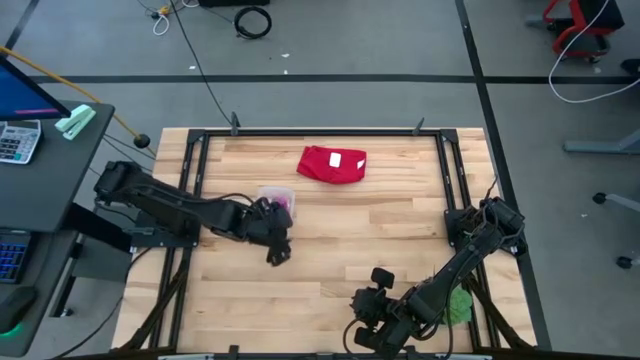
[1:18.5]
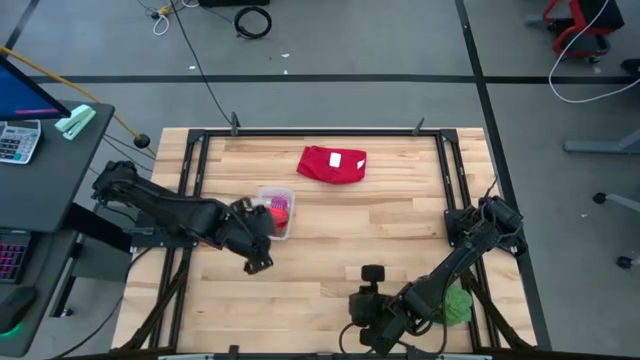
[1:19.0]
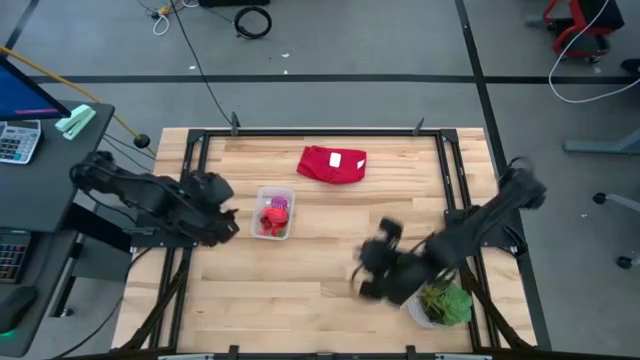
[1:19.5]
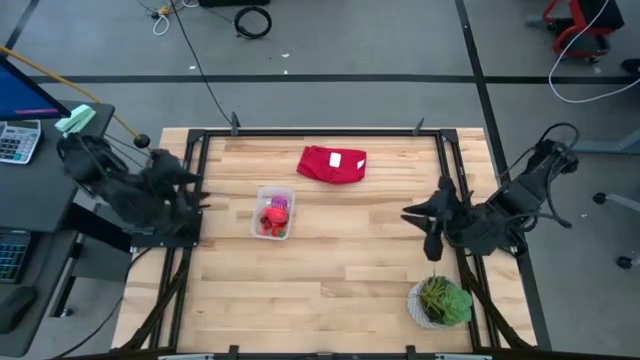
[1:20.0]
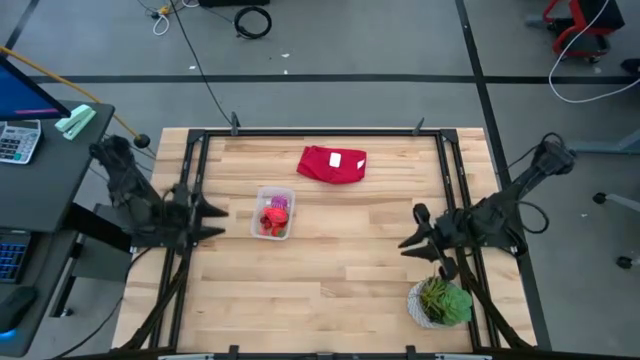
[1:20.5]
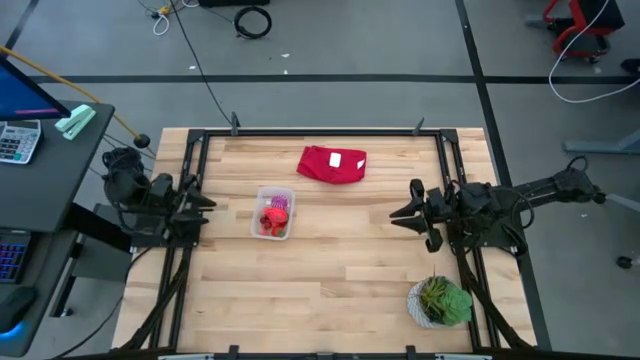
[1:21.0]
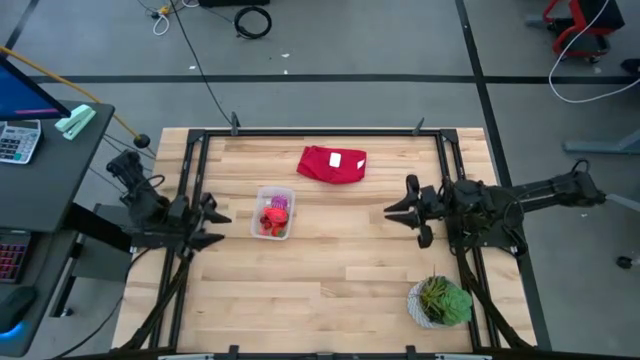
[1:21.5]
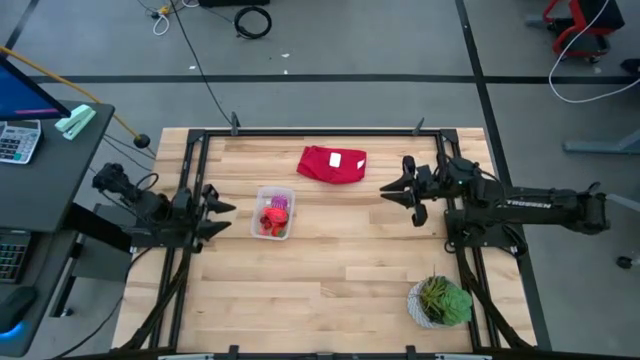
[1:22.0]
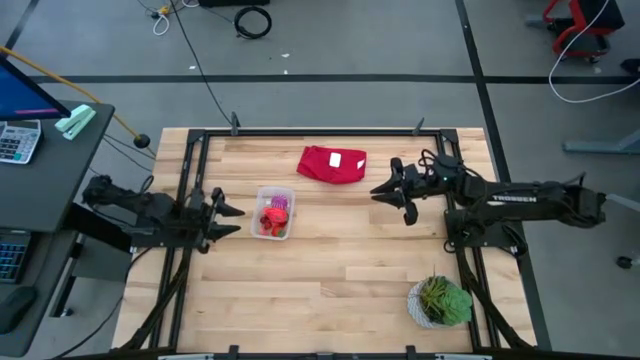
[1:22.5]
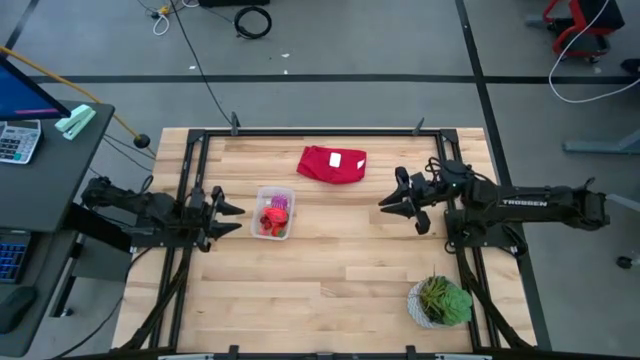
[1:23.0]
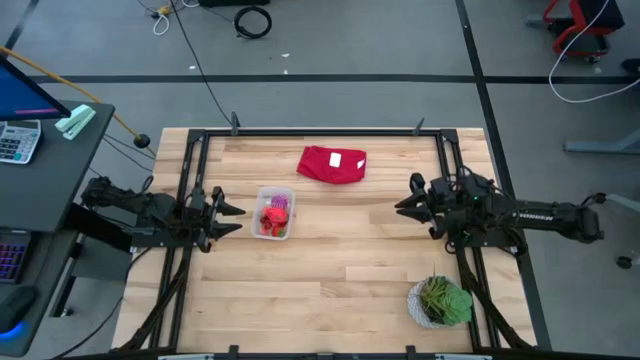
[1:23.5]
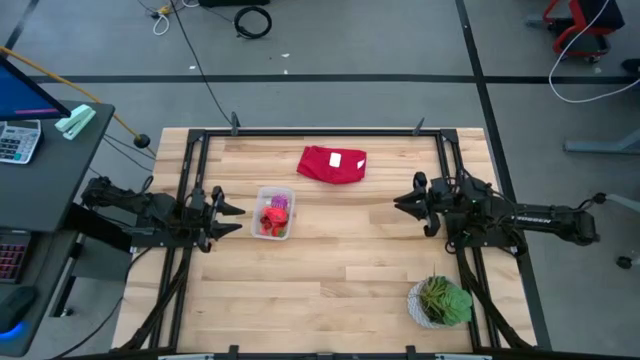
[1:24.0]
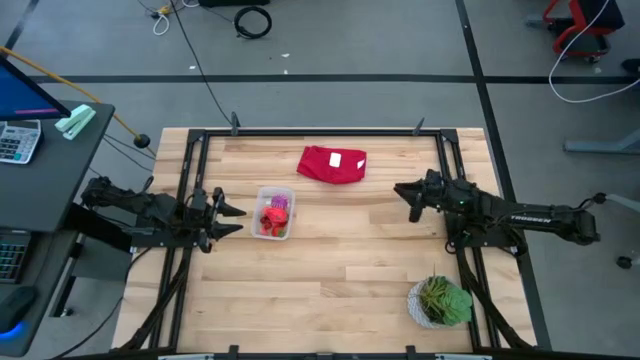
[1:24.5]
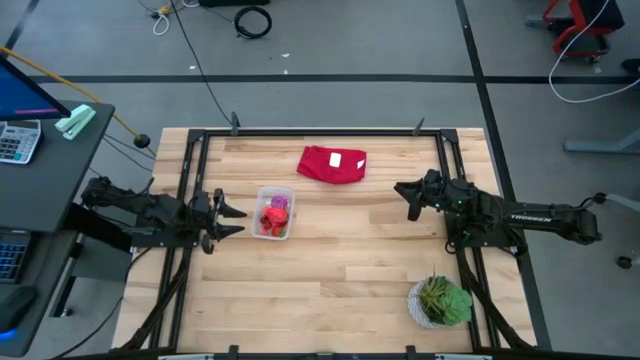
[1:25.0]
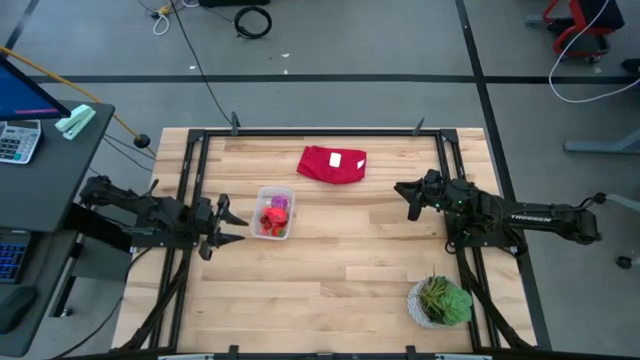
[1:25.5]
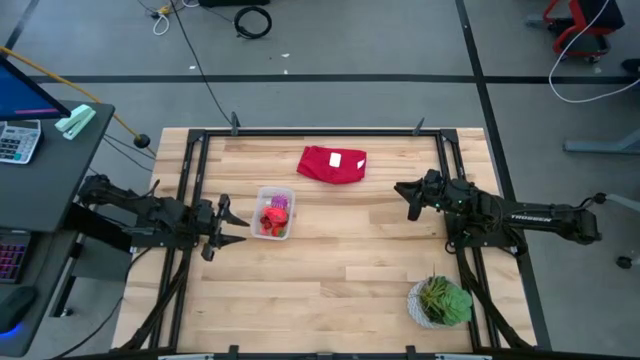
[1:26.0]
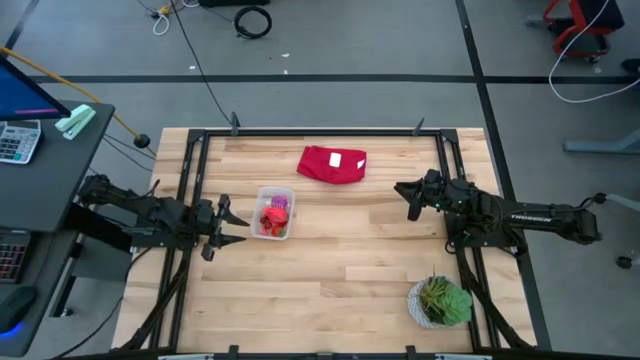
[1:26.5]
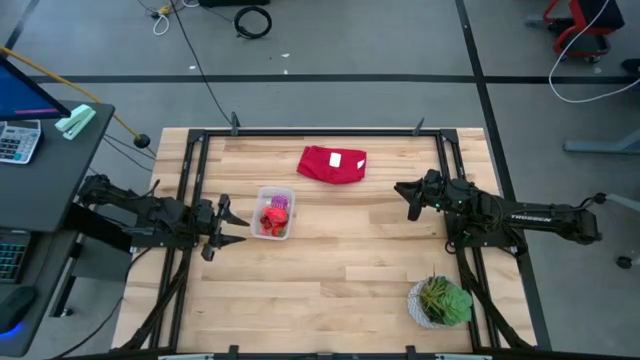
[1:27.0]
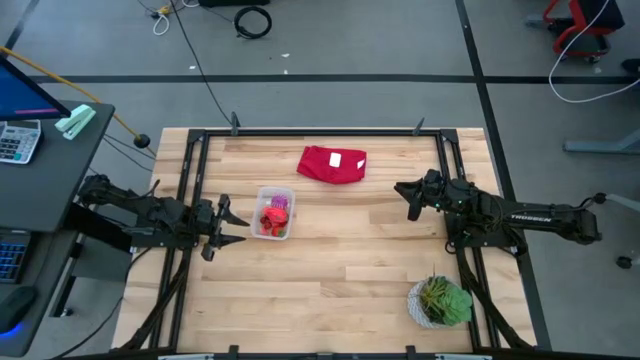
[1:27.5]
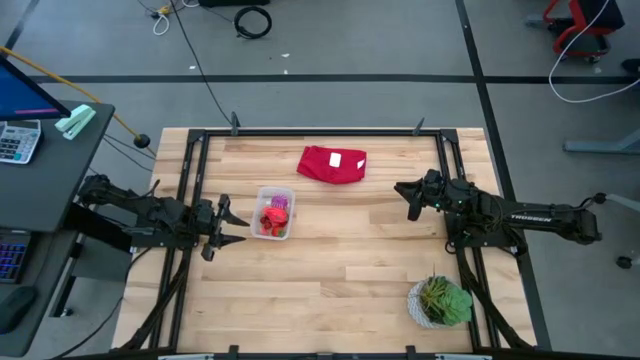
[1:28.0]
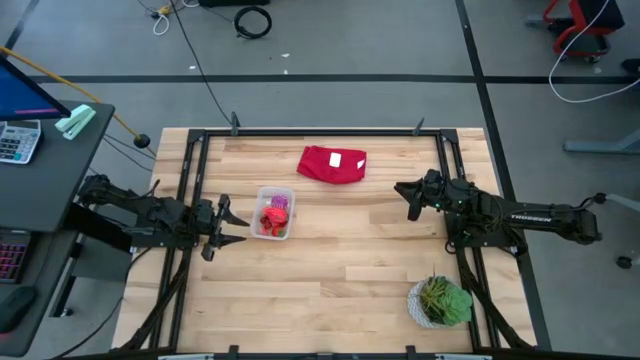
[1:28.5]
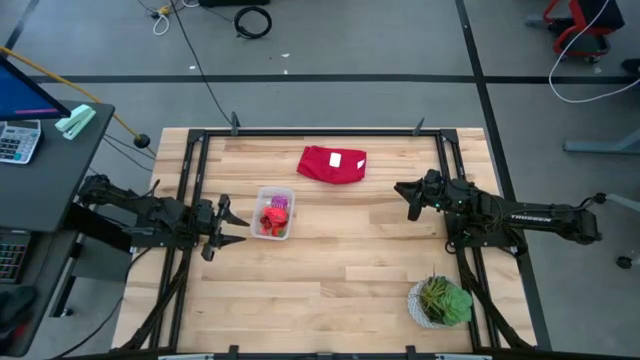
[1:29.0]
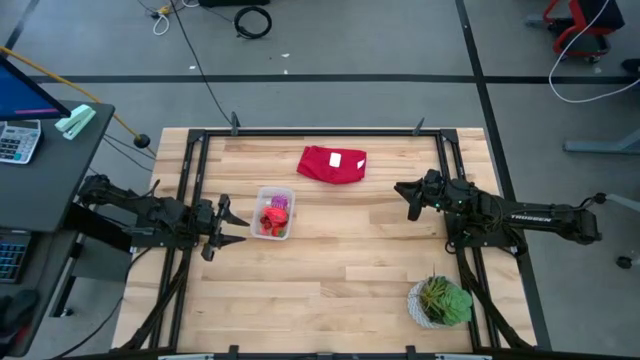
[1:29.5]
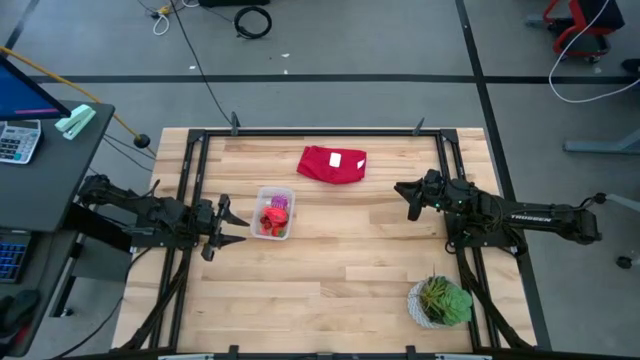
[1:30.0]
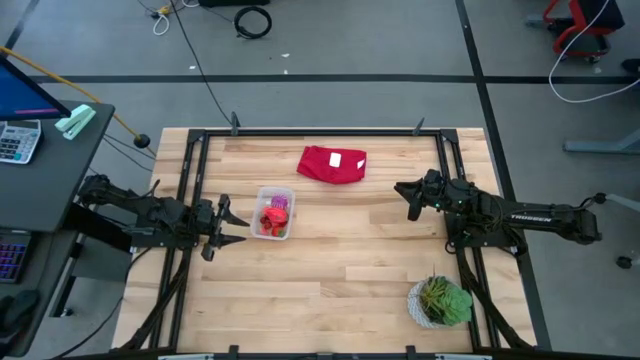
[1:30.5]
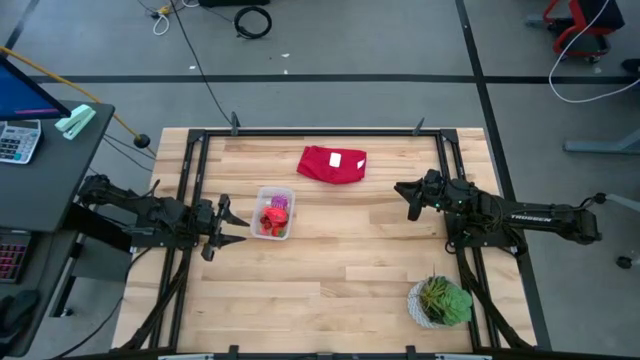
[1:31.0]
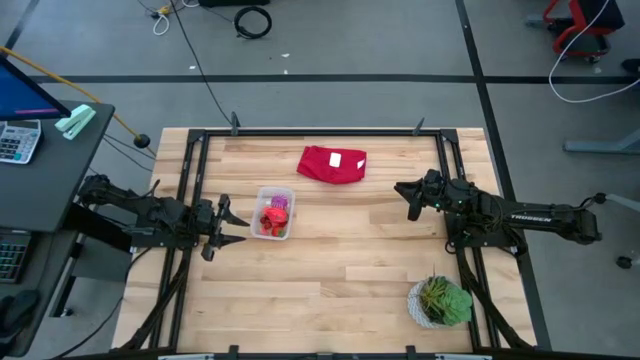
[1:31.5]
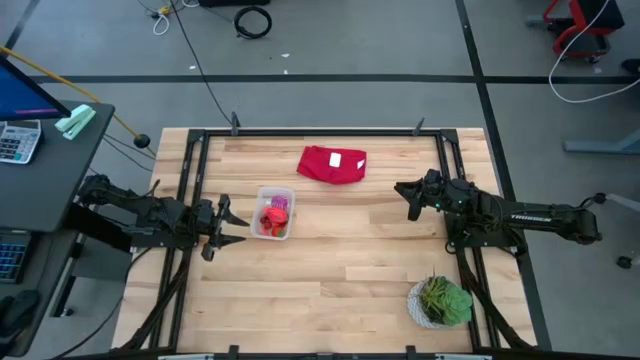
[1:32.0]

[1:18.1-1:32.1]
Task: Pick and placing Produce into tupperware
Return to Home Position

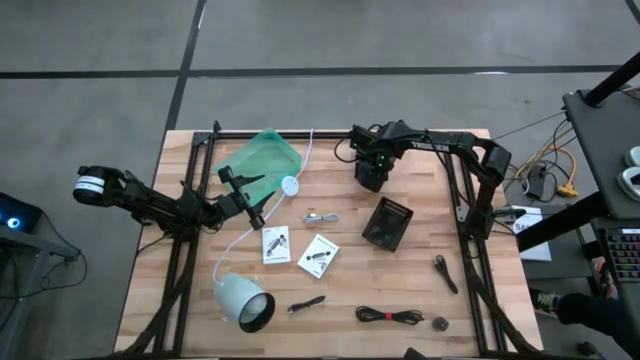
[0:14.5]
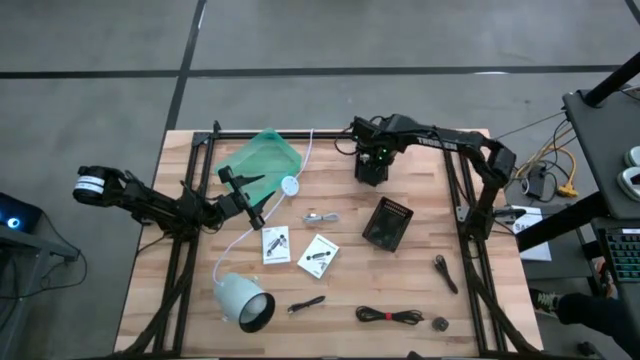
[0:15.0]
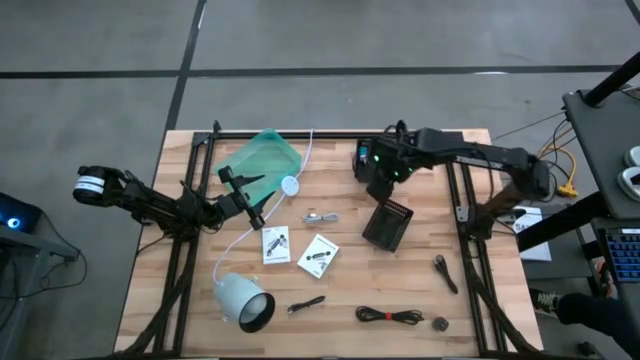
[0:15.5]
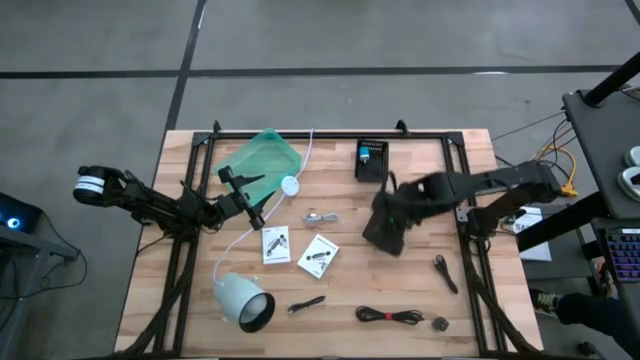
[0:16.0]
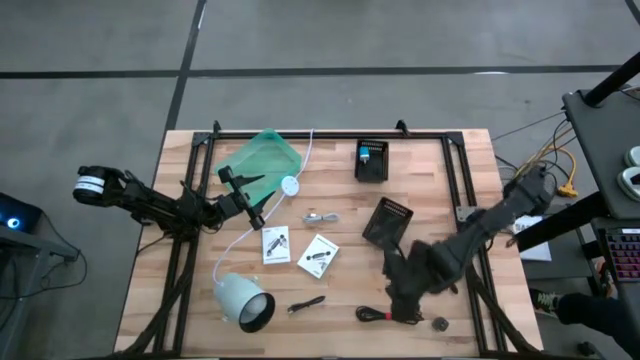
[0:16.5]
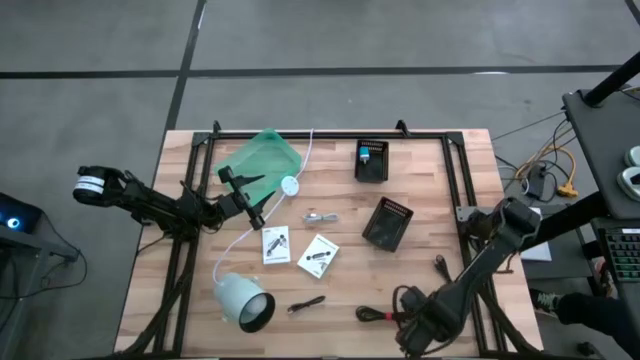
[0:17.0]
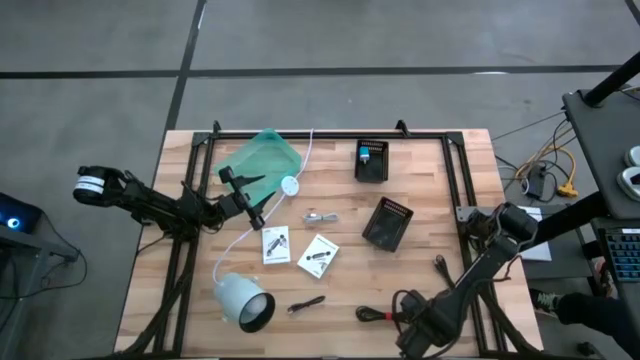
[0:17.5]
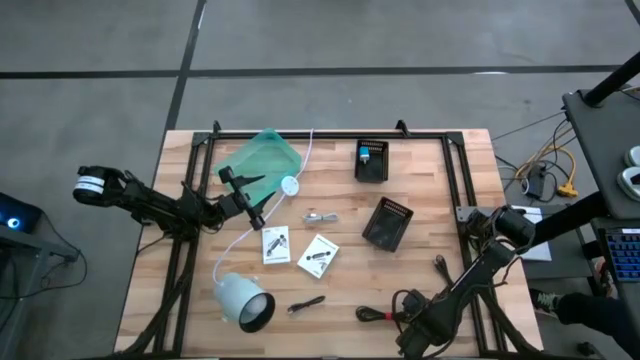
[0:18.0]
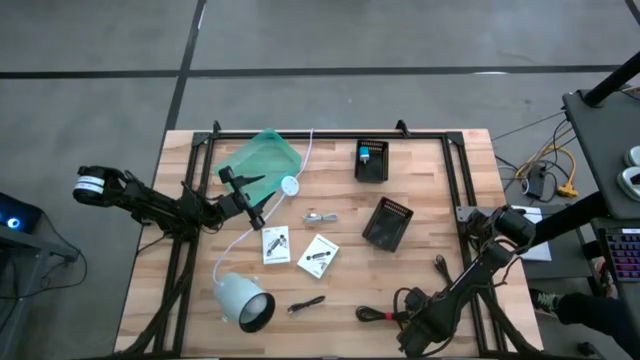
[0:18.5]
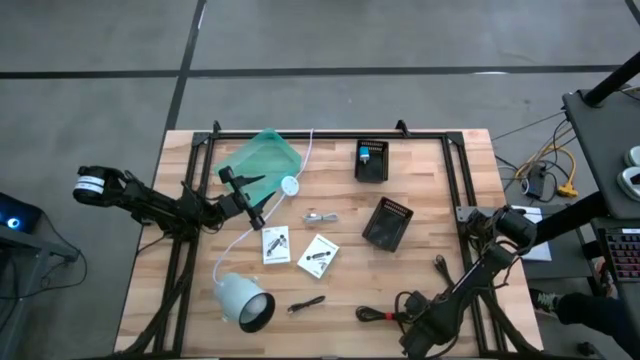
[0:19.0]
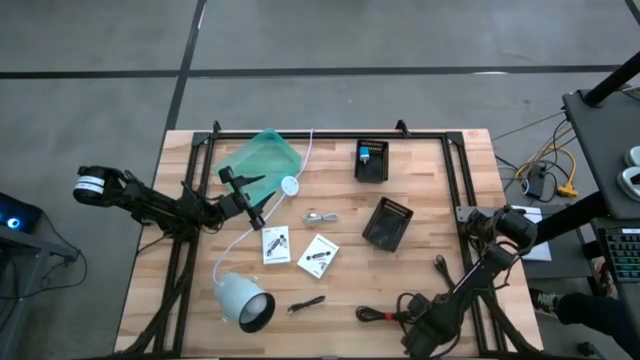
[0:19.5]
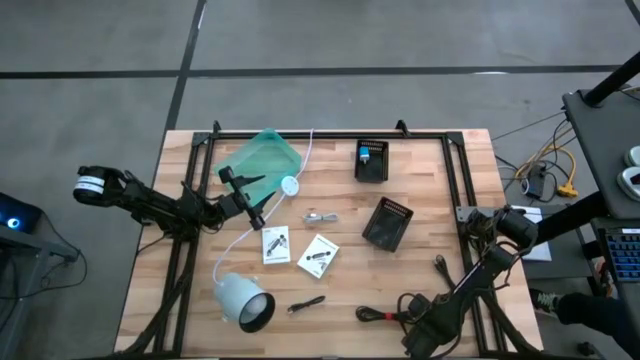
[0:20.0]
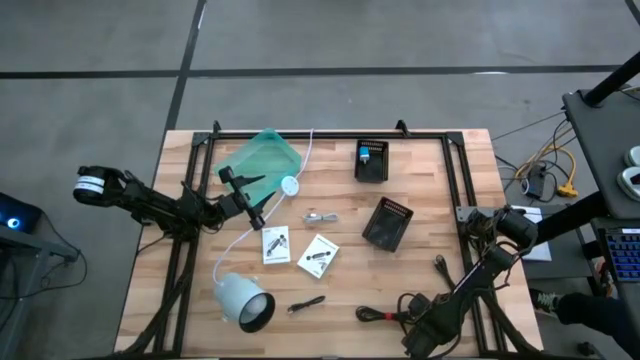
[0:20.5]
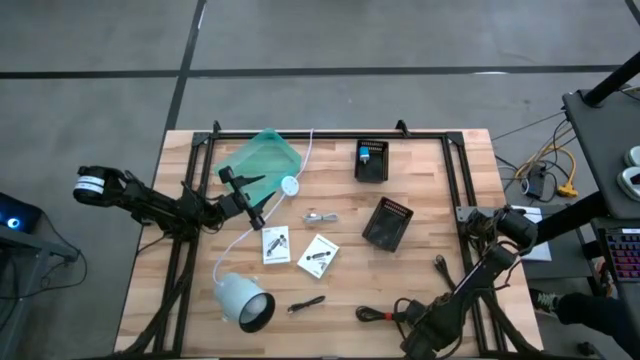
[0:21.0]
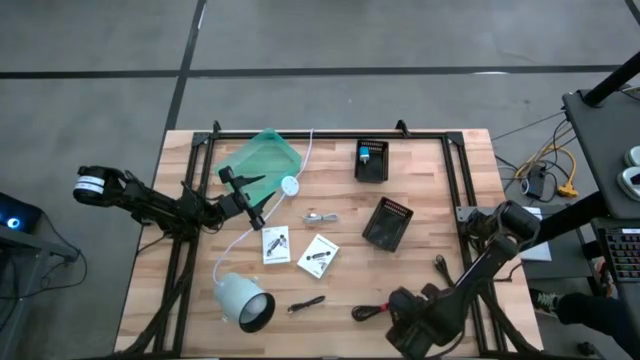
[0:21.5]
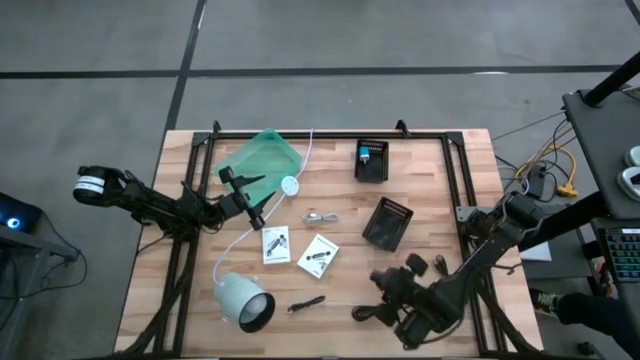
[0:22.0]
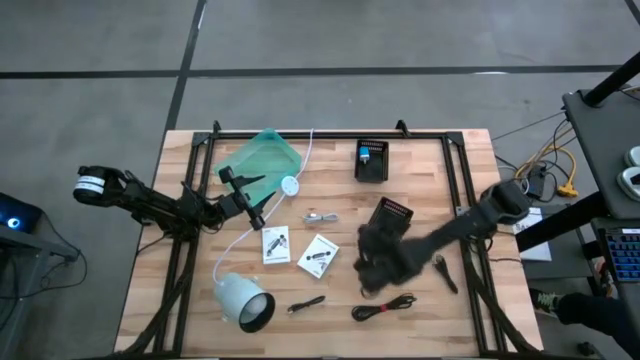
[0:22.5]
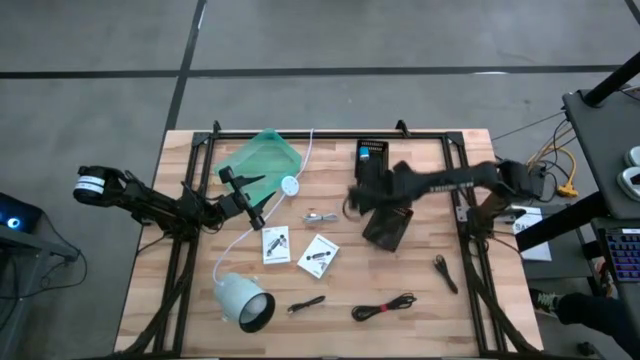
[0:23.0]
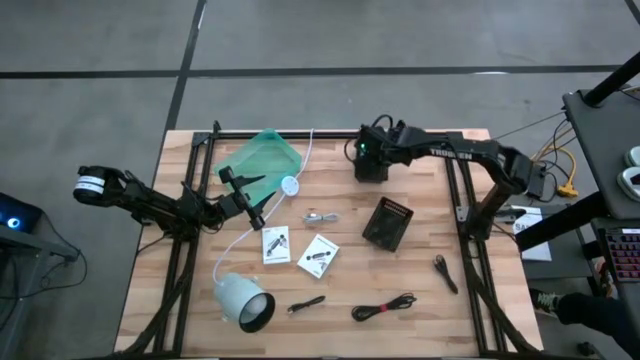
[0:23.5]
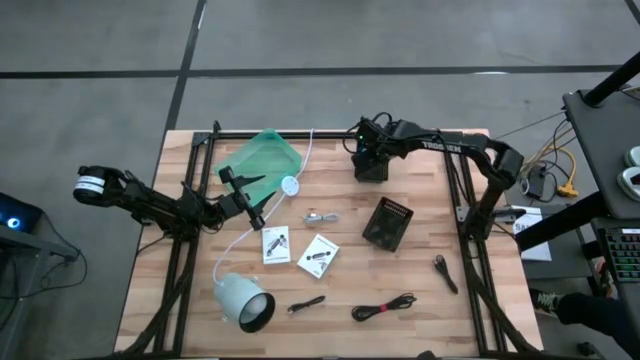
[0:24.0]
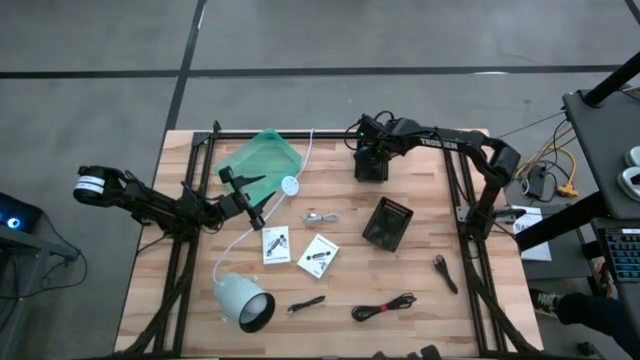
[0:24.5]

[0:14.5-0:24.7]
Task: Pick and place items into bin
Put the black charger adapter into the top black bin
